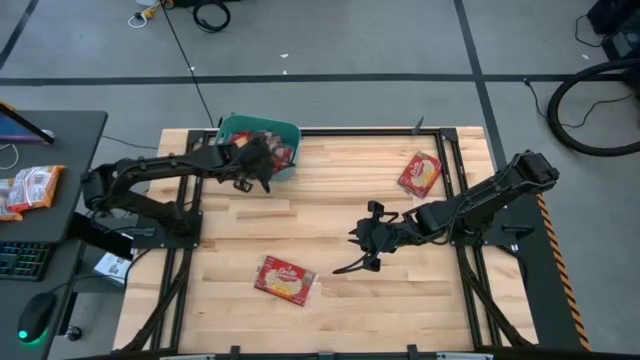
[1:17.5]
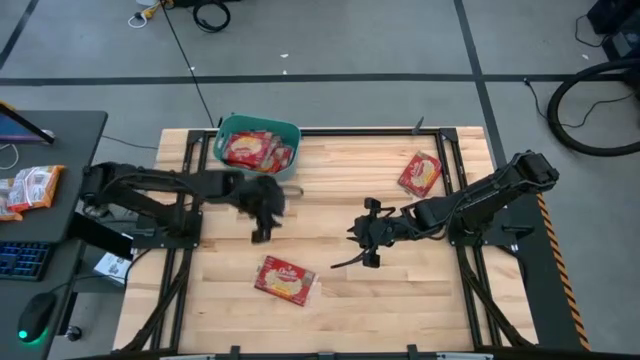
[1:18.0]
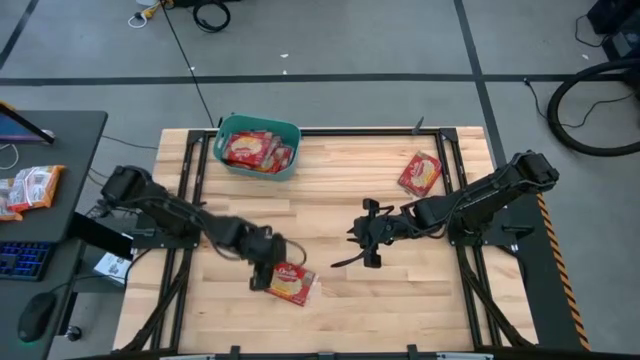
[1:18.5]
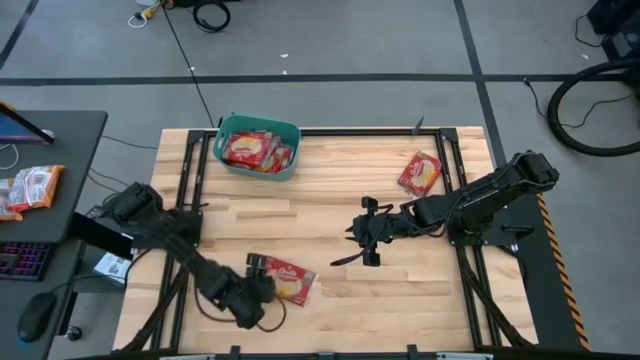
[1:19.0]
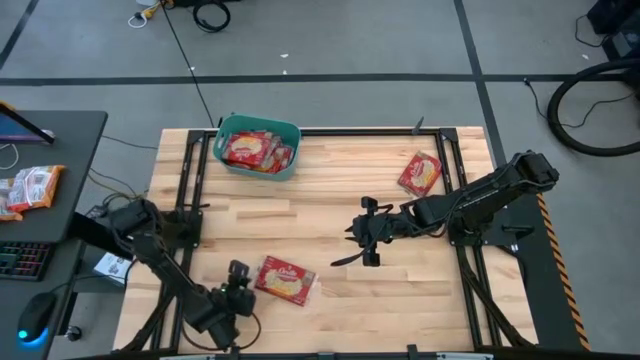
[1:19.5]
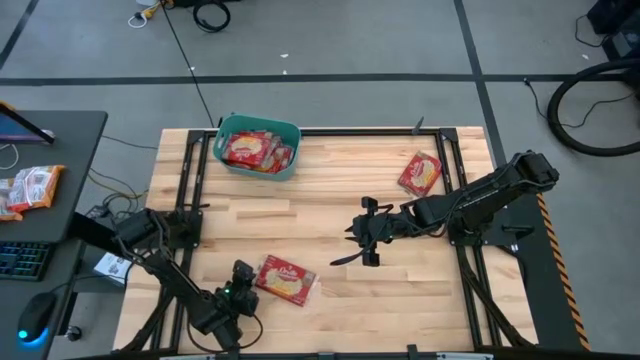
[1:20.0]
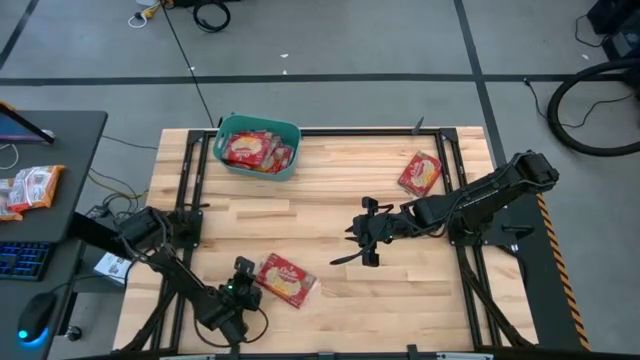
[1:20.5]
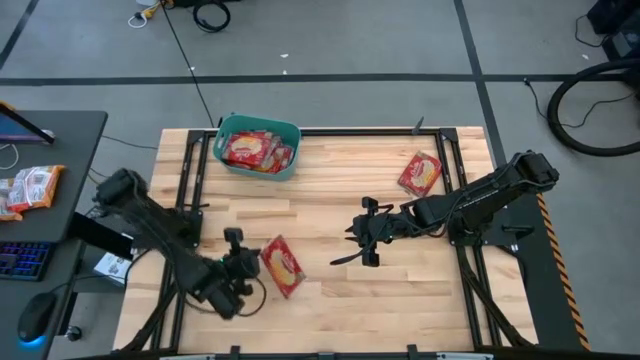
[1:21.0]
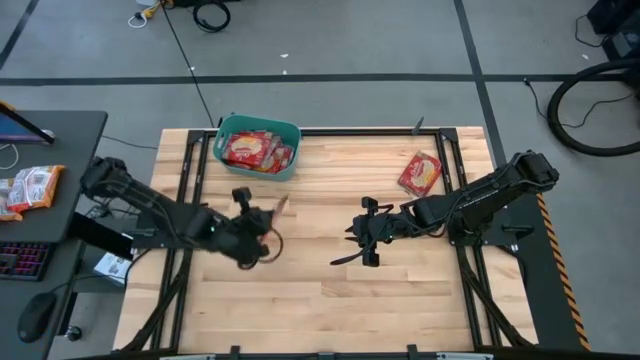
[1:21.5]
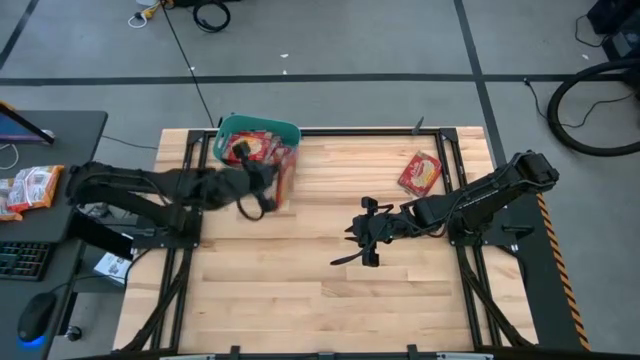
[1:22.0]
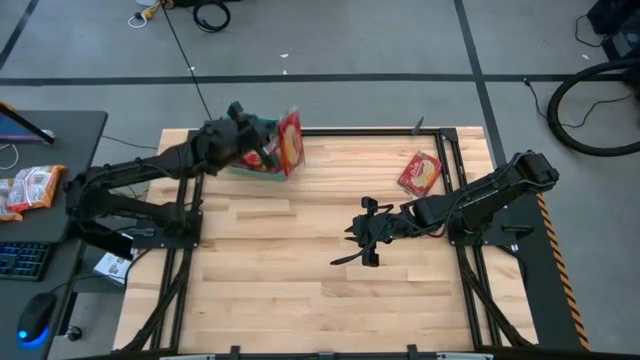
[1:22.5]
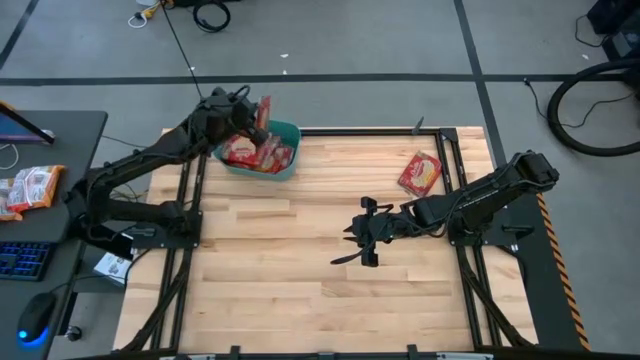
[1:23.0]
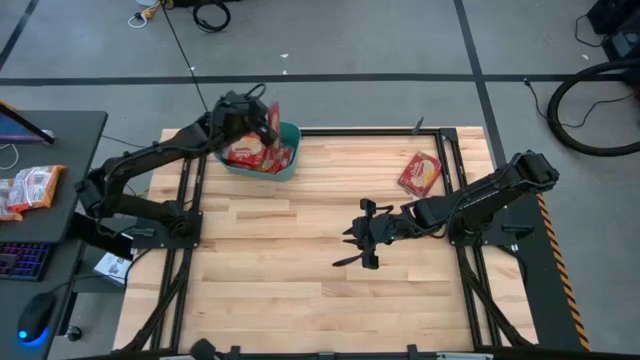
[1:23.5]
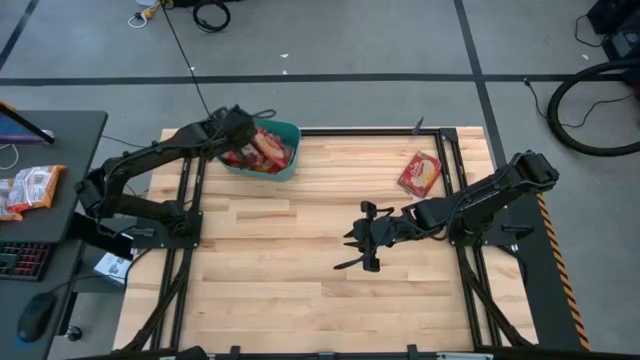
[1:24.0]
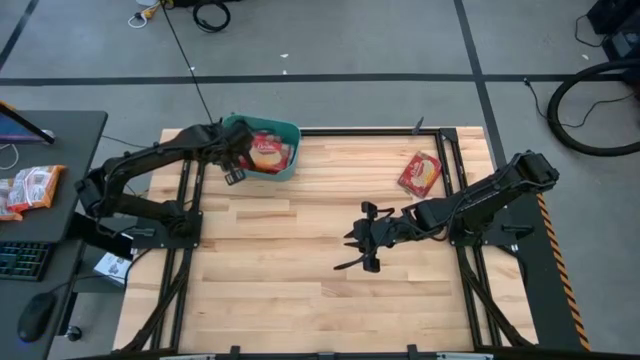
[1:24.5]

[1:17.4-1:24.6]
Task: Sort popcorn bags into baskets
Put the bottom popcorn bag into the bin

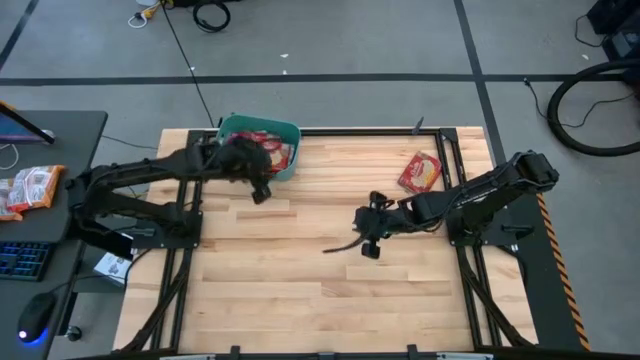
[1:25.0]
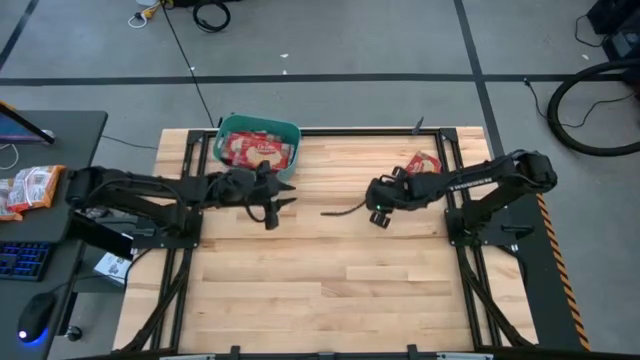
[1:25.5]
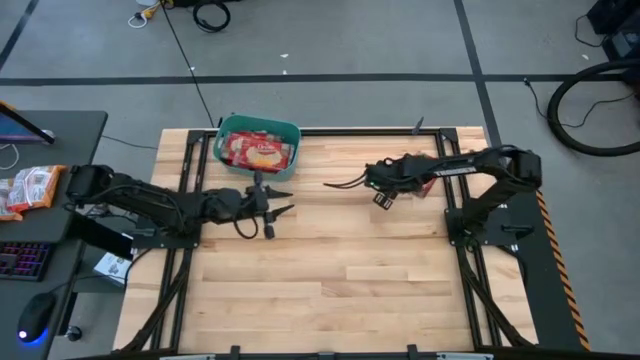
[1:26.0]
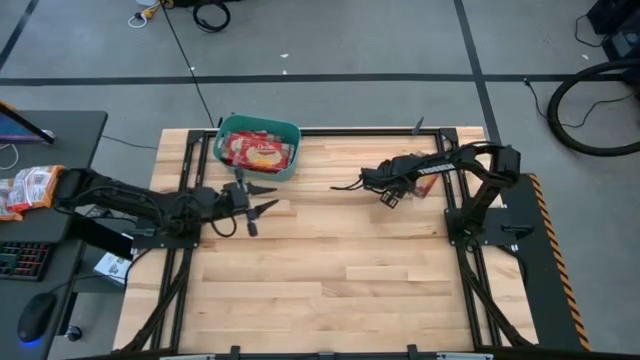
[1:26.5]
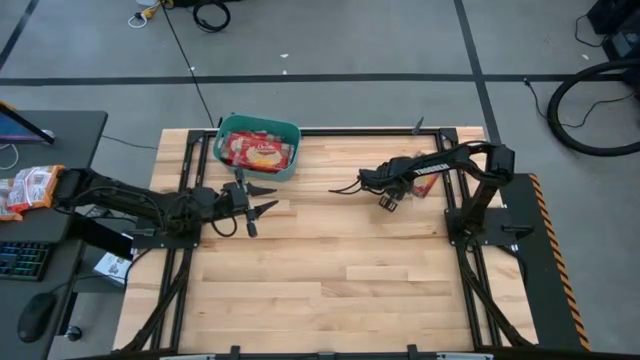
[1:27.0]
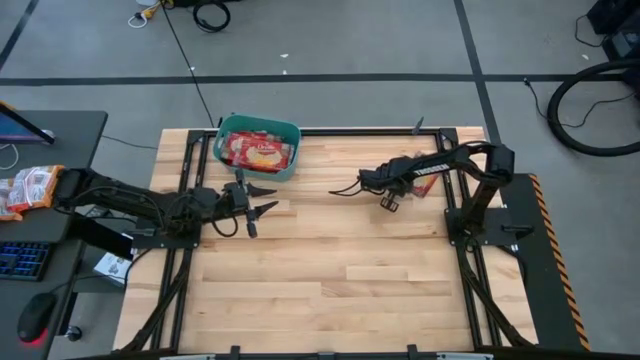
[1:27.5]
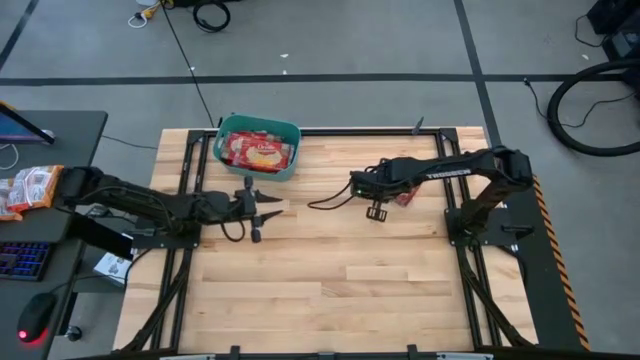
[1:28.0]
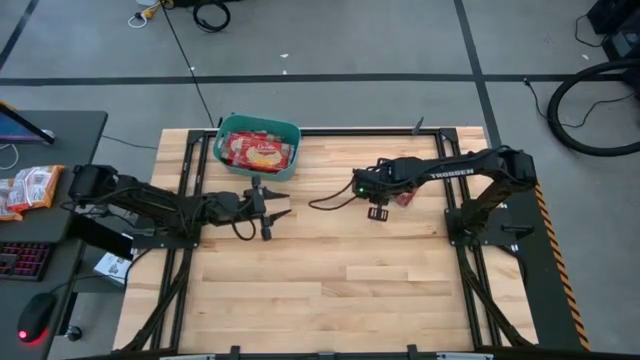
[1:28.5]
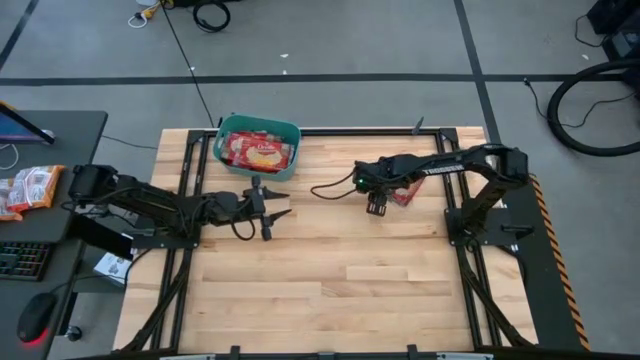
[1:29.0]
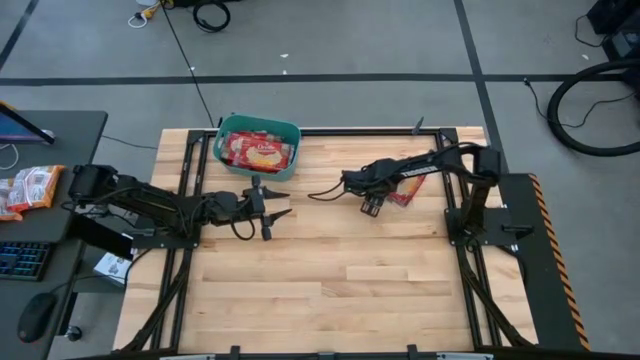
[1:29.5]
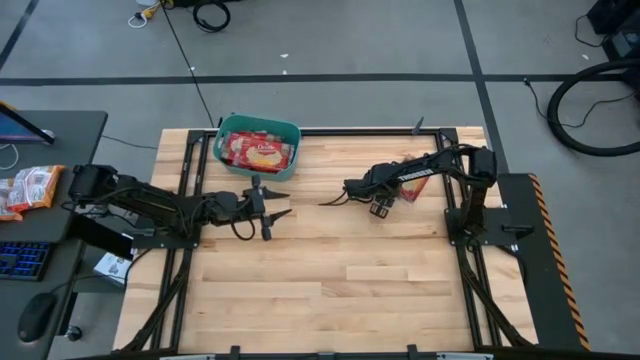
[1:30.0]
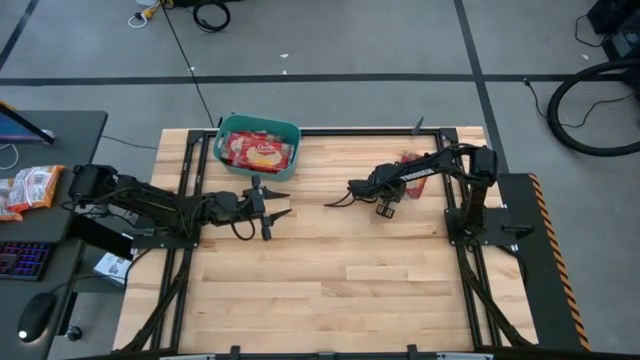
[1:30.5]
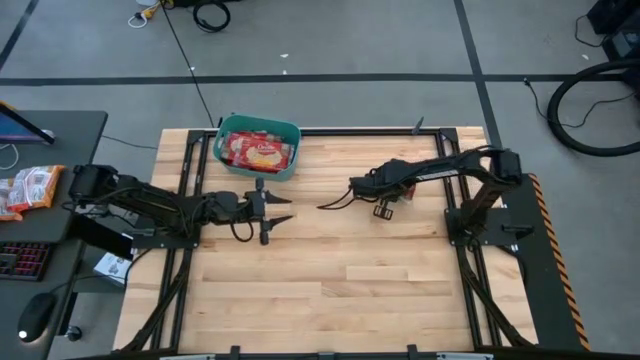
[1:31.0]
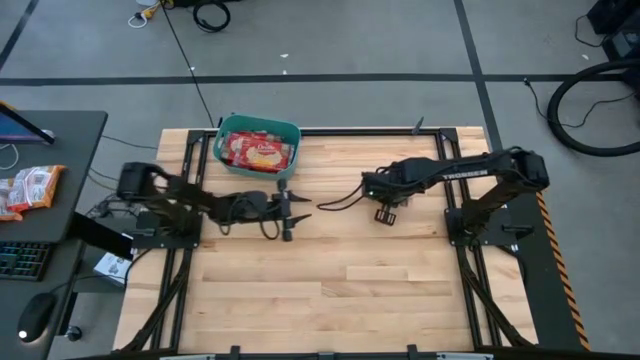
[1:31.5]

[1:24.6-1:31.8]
Put the popcorn bag into the bin

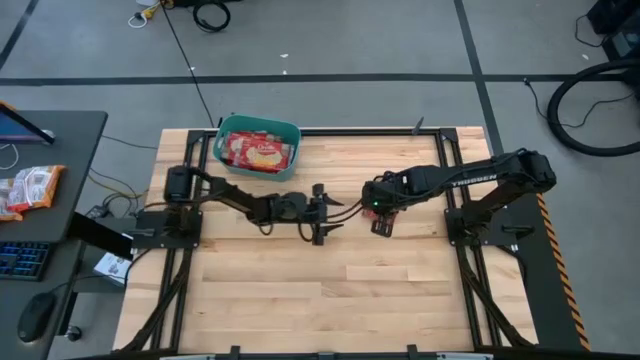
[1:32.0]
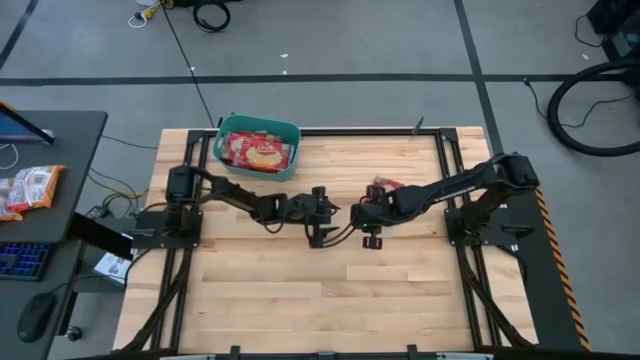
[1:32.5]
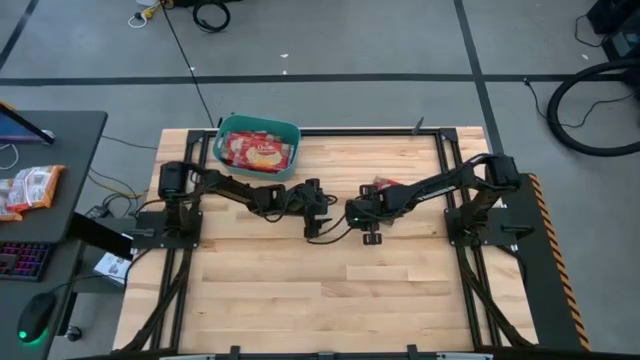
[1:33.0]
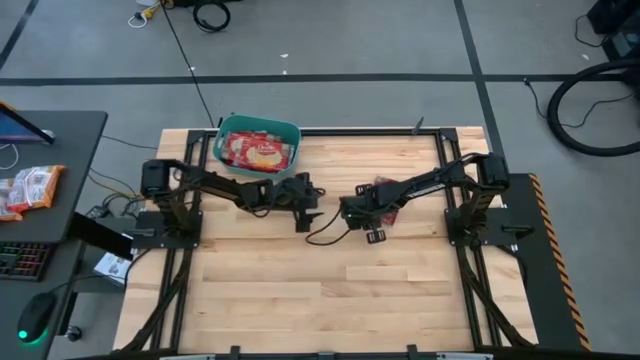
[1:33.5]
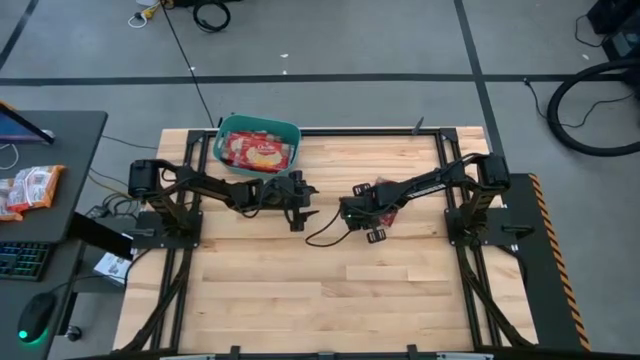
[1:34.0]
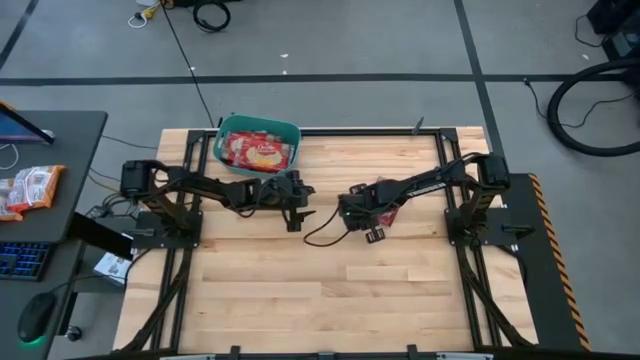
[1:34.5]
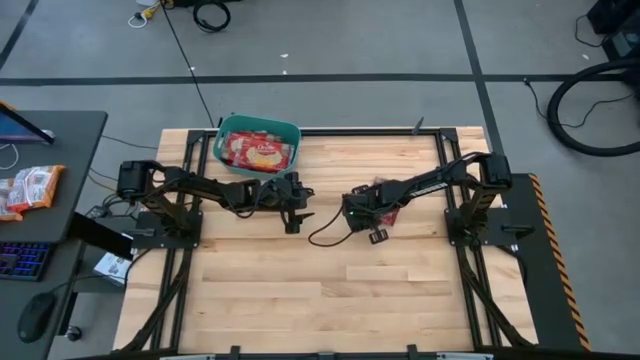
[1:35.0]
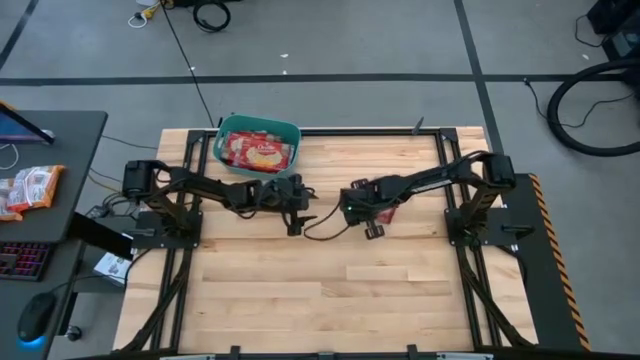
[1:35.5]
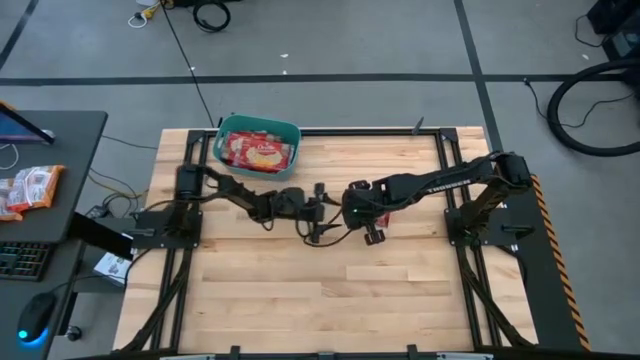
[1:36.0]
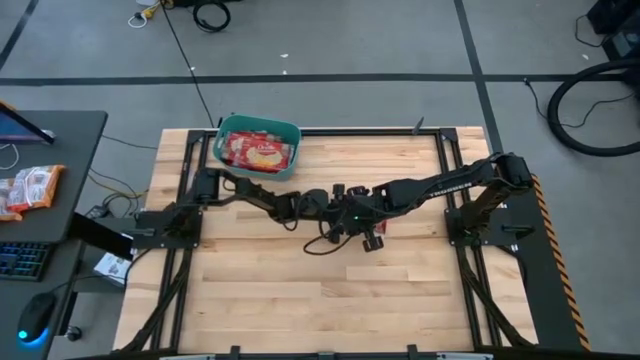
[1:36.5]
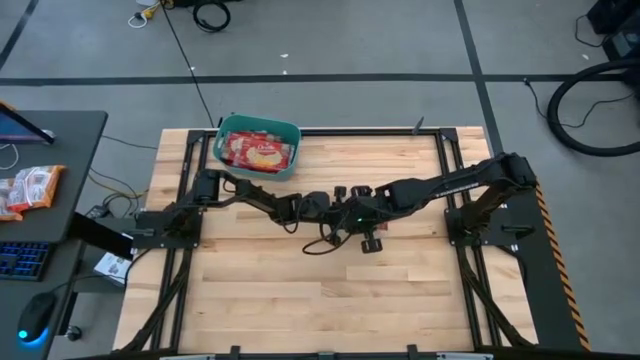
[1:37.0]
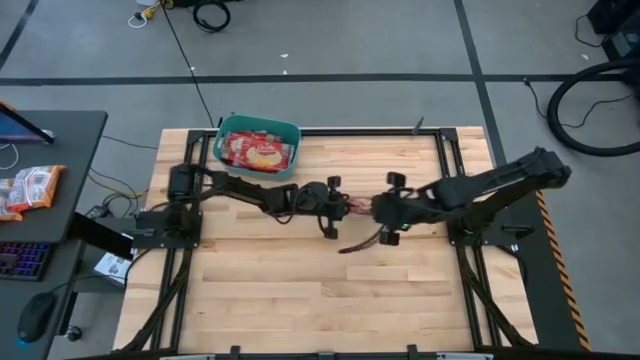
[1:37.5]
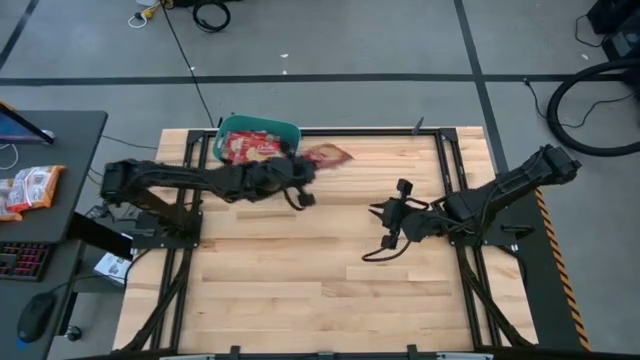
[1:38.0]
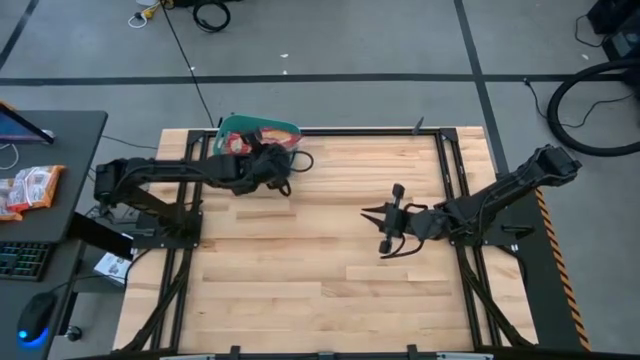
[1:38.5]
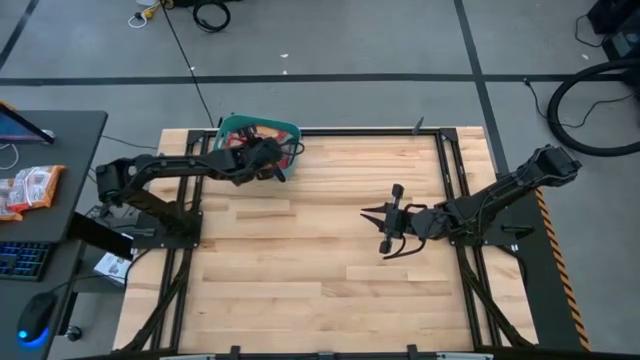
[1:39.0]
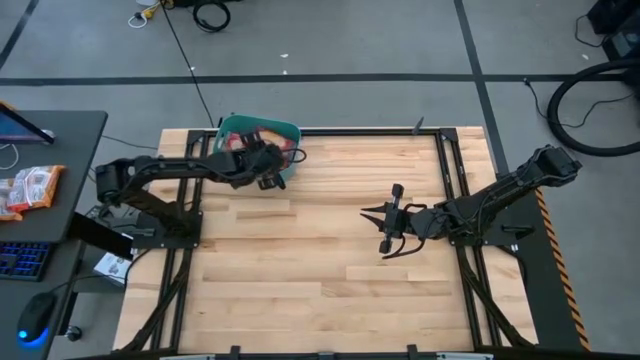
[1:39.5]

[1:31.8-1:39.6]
Put the popcorn bag into the bin
